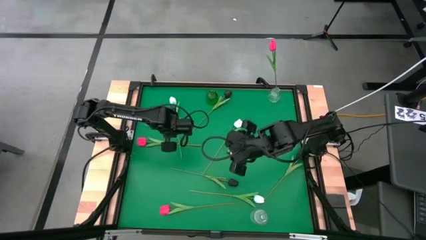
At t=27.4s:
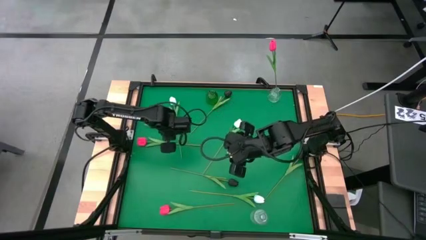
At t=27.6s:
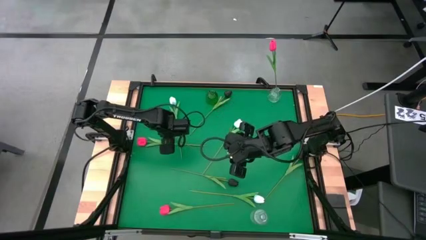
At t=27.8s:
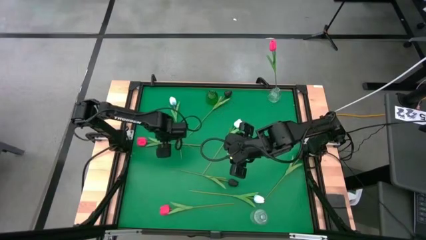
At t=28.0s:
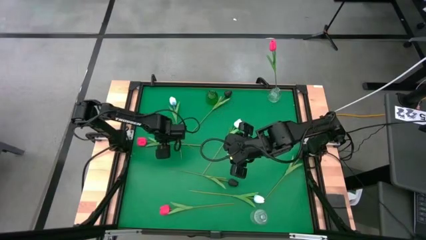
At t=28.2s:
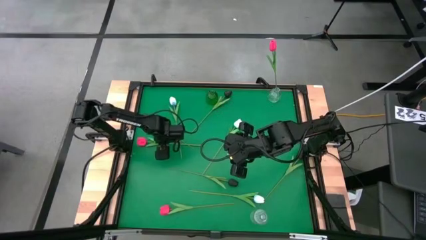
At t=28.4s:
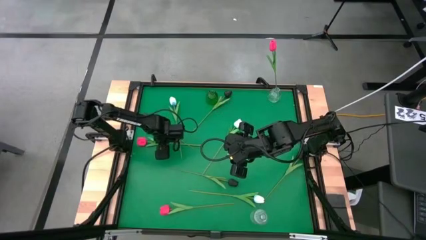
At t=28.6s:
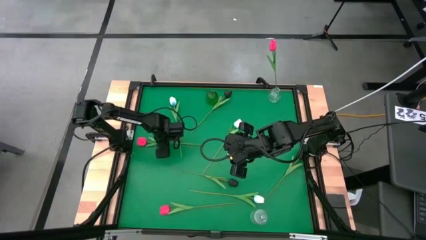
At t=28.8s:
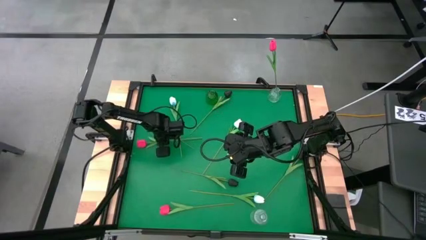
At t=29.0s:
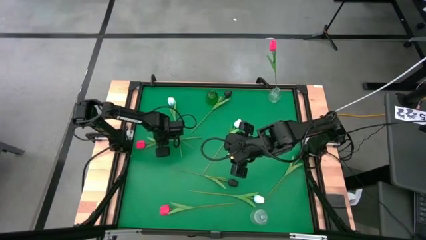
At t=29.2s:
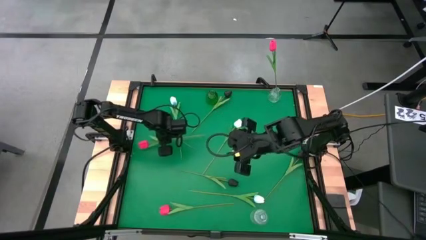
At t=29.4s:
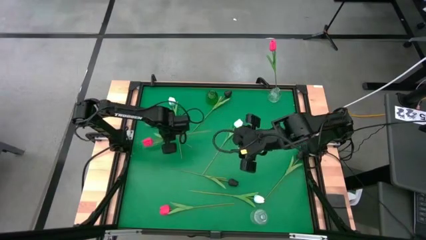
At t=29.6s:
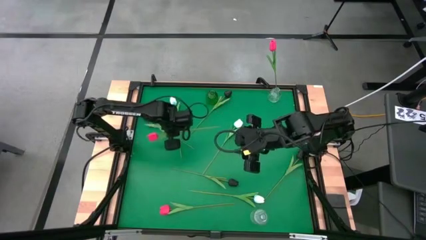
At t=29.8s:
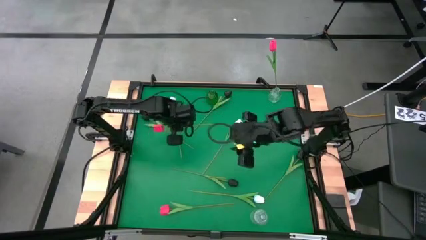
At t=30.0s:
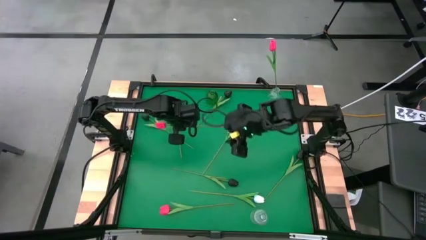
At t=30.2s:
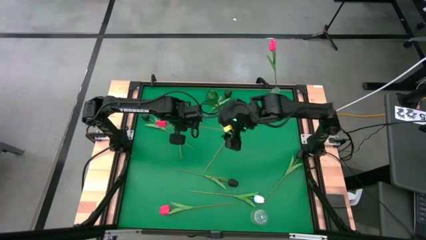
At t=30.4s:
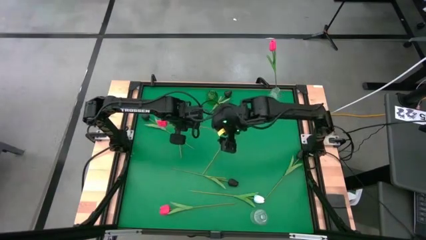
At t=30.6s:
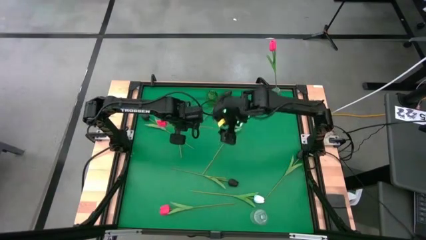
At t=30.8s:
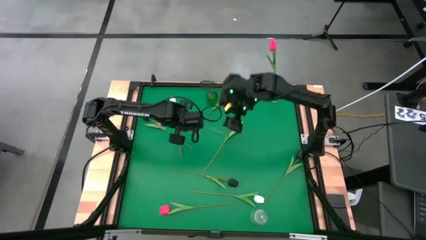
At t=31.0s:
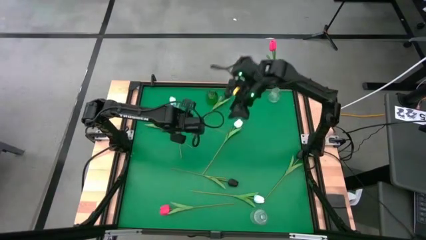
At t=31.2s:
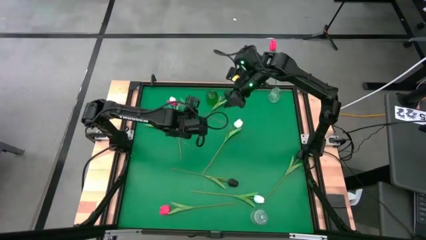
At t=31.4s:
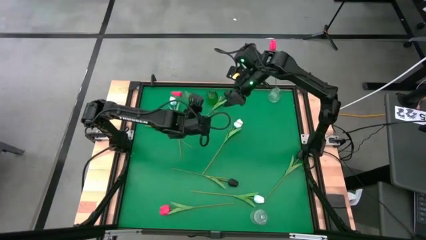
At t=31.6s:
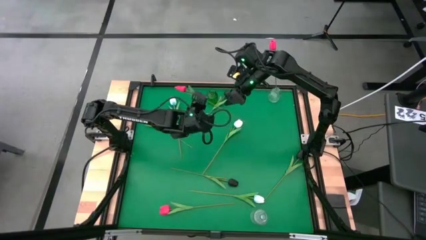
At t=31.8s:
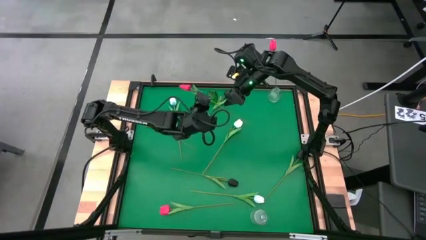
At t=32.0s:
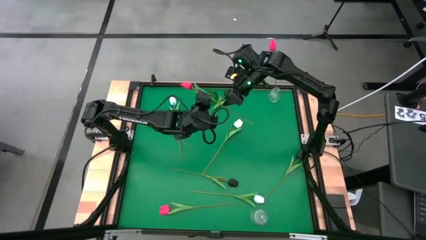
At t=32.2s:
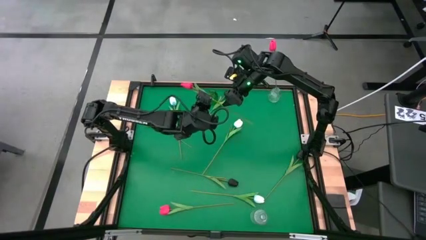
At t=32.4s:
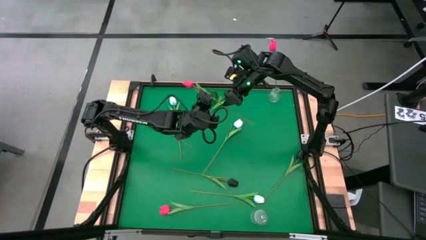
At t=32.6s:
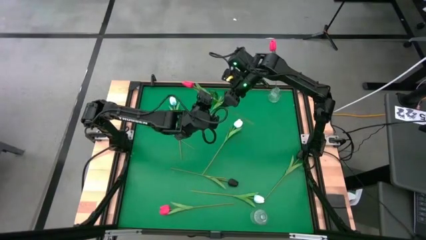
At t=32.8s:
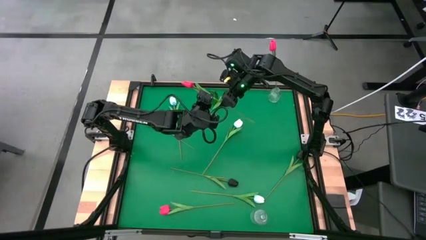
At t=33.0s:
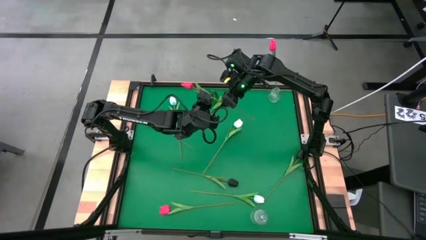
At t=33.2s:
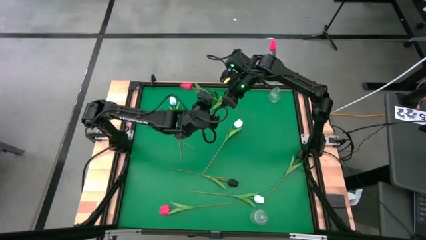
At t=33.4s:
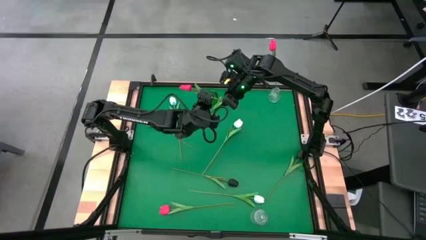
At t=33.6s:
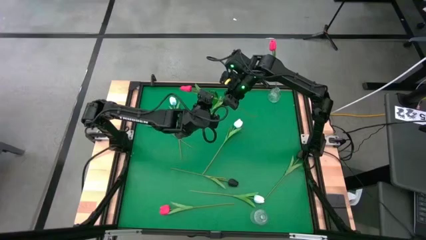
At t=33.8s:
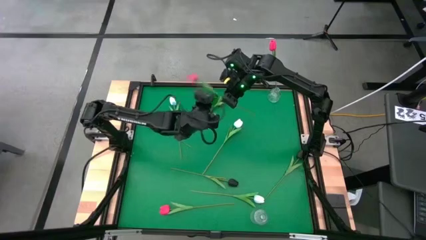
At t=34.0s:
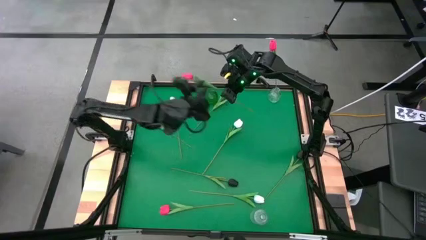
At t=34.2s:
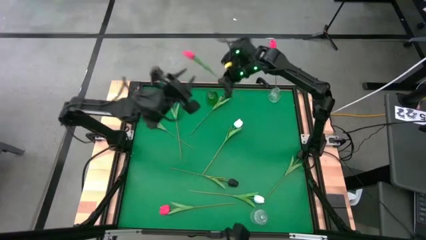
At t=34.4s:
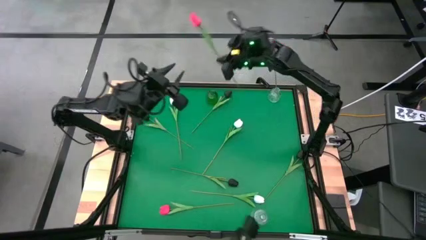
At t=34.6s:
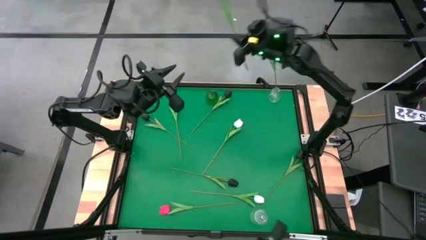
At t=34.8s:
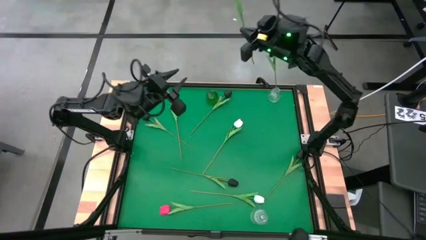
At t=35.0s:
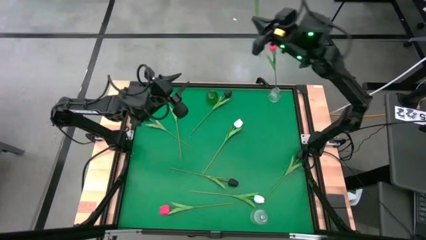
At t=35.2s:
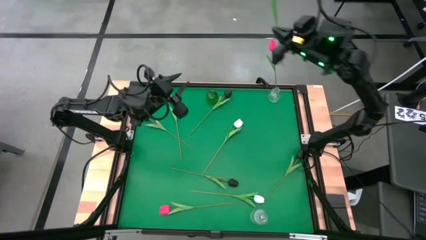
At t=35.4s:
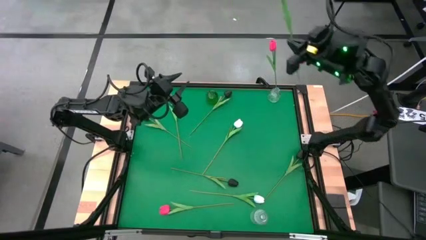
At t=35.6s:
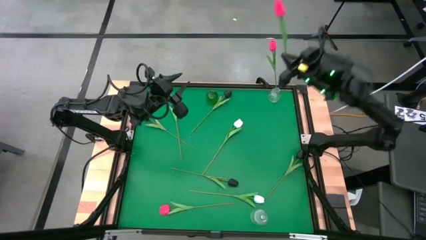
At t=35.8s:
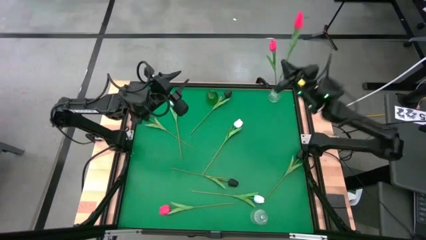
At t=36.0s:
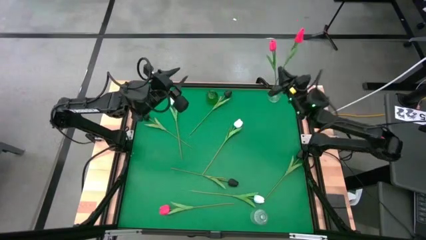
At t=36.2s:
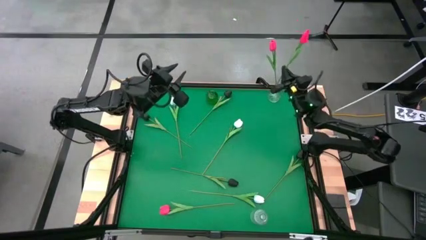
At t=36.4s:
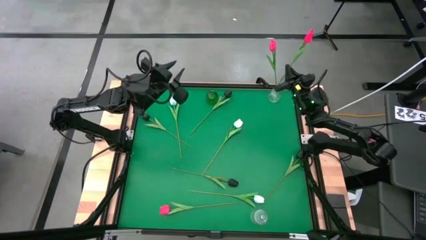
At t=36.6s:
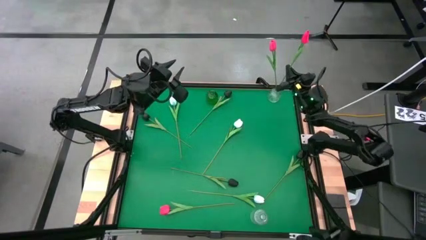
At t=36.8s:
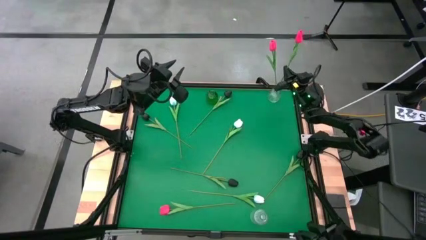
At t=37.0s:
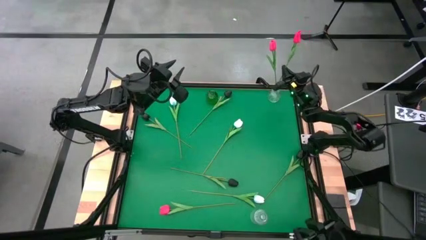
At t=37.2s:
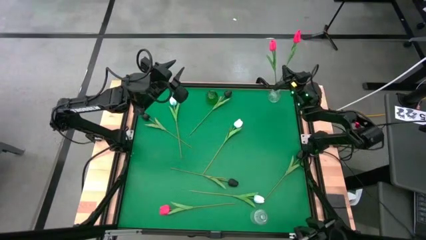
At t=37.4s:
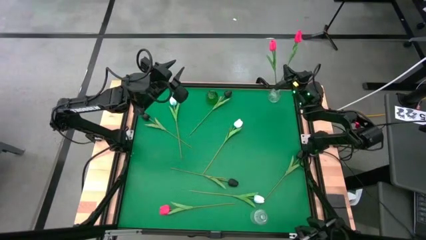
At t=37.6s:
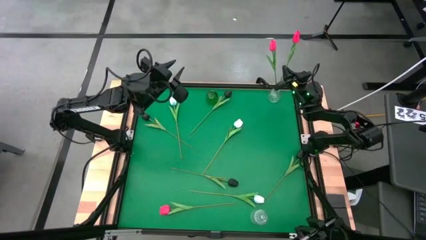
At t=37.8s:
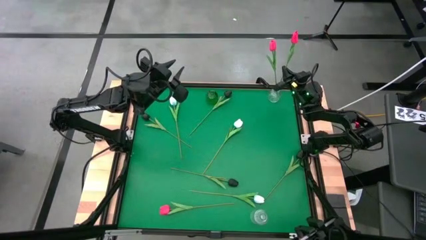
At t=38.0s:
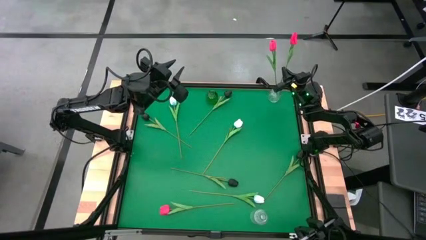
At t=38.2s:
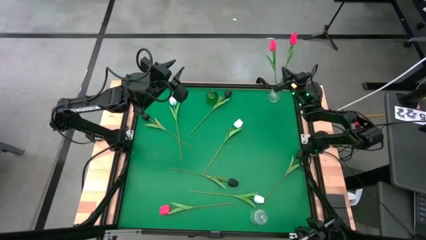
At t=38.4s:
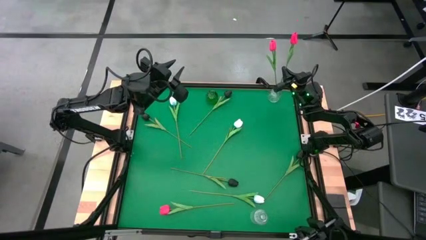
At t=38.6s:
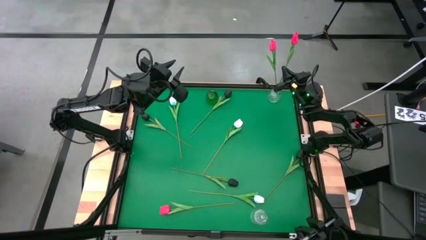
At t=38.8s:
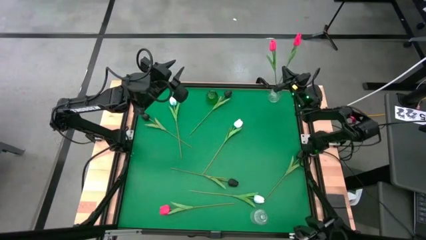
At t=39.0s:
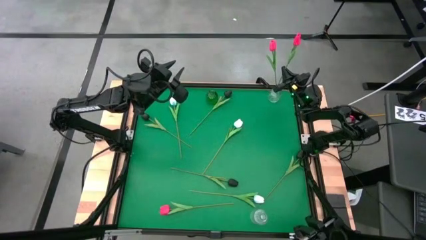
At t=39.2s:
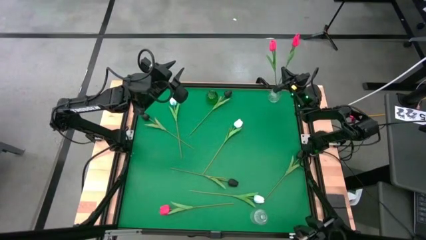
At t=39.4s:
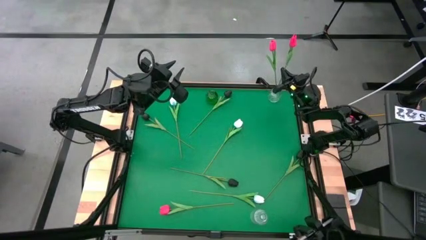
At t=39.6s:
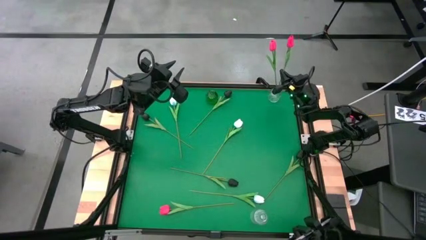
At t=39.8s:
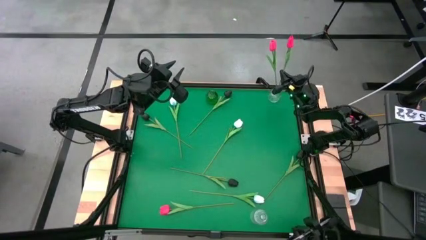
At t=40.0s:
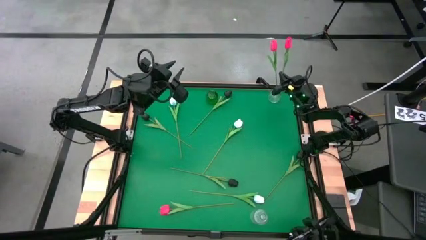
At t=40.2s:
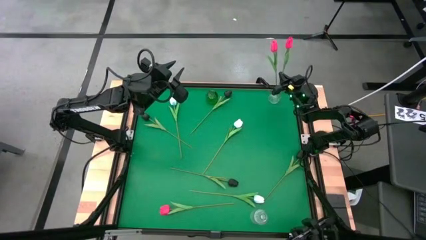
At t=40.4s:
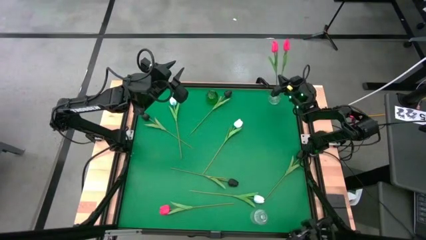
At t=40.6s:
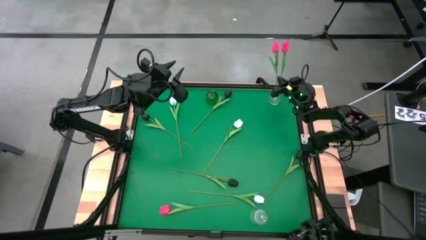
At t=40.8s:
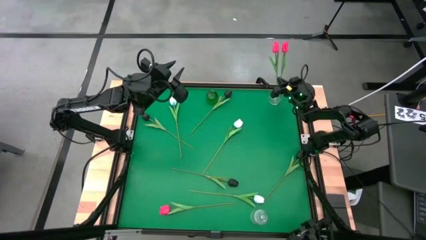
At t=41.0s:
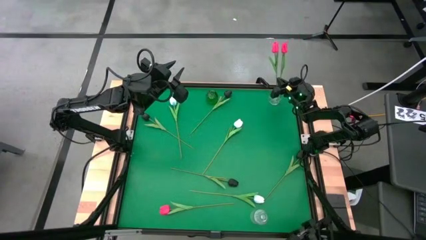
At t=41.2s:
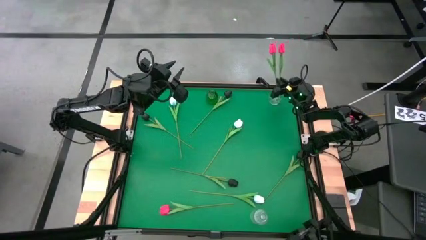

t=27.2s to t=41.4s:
Task: Sort flowers into vase by color
Put the pink tulip into the top transparent vase
